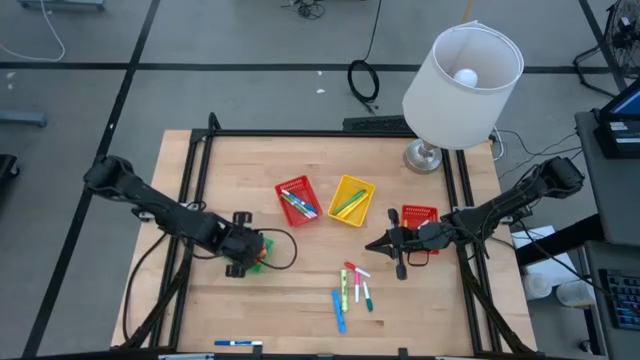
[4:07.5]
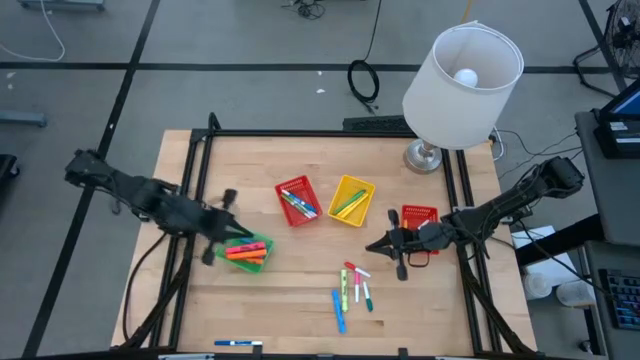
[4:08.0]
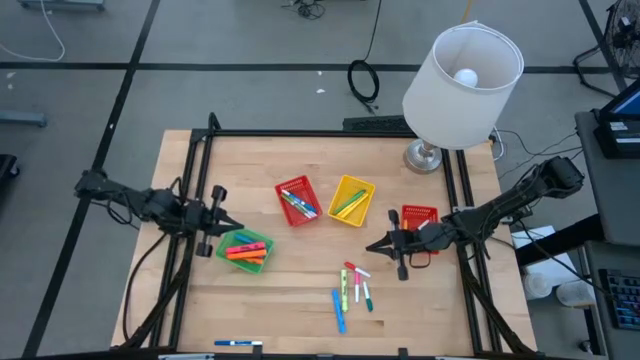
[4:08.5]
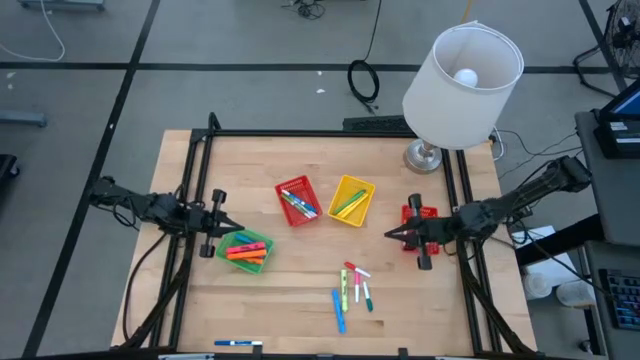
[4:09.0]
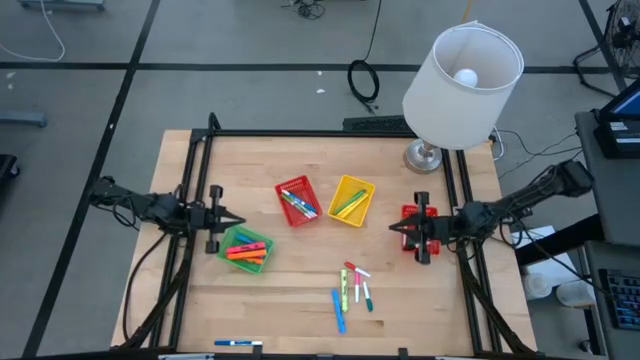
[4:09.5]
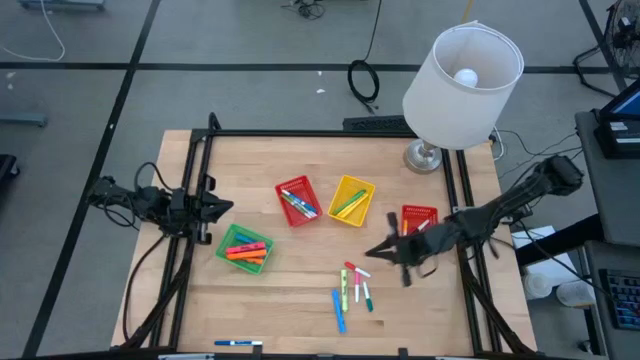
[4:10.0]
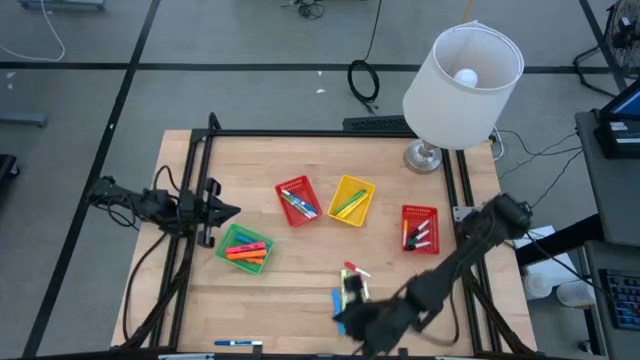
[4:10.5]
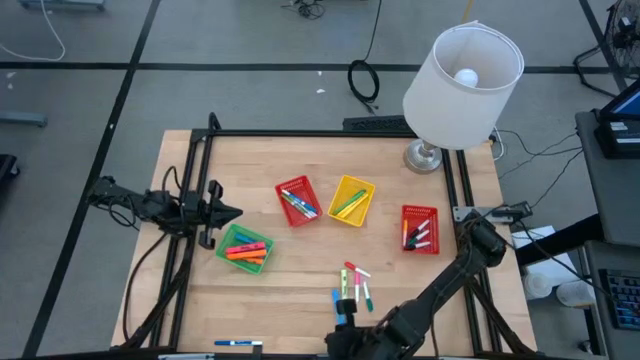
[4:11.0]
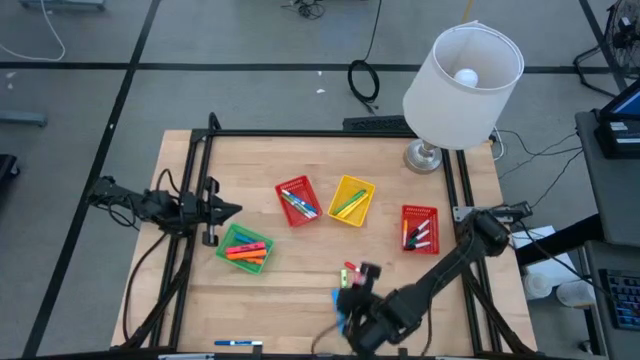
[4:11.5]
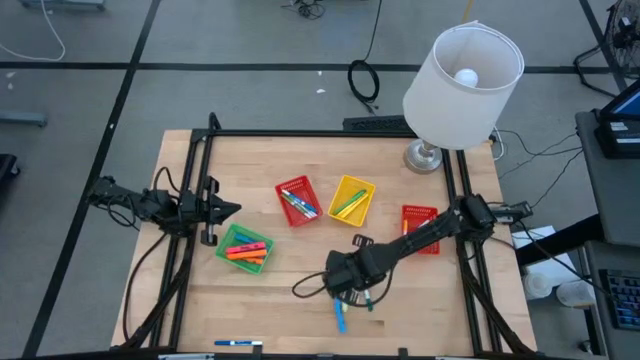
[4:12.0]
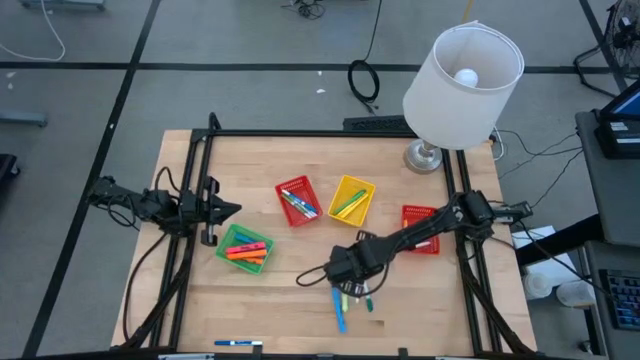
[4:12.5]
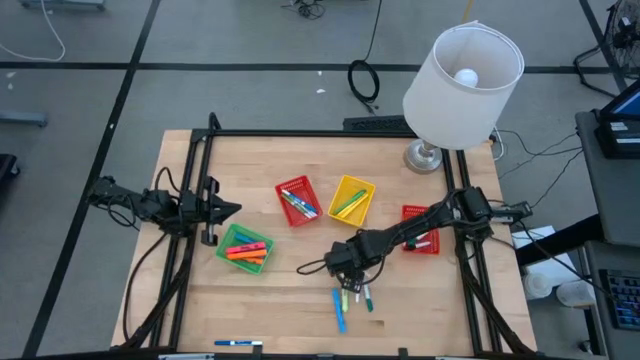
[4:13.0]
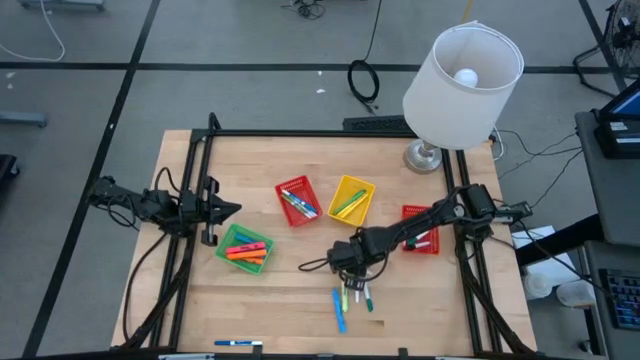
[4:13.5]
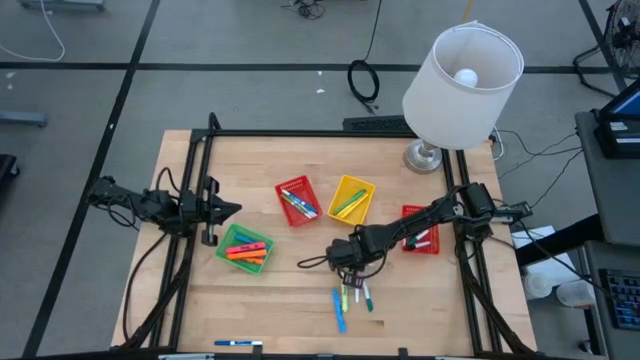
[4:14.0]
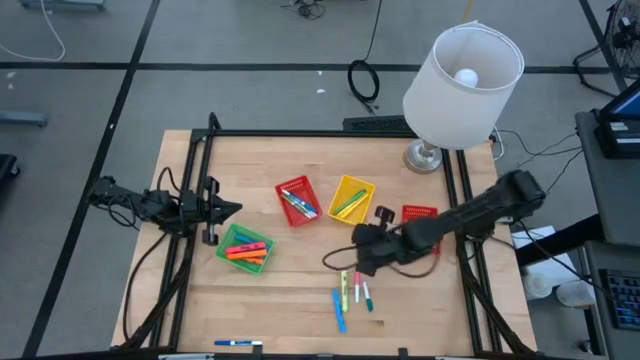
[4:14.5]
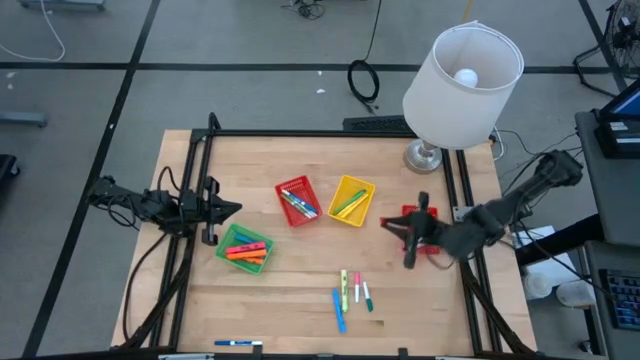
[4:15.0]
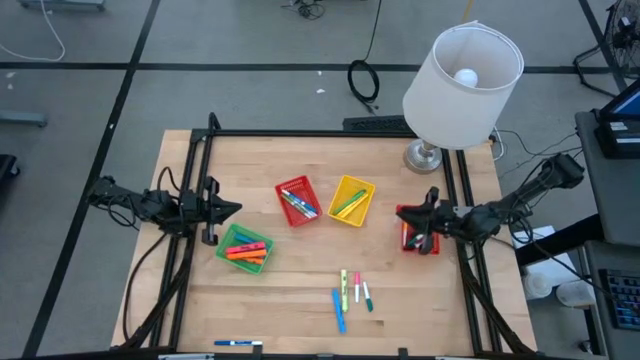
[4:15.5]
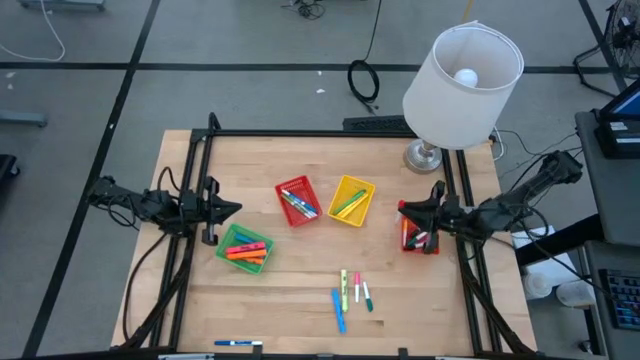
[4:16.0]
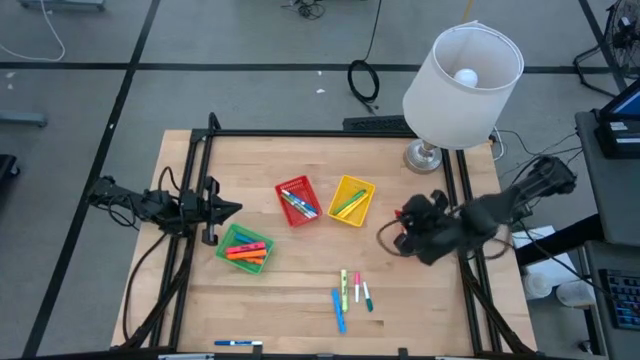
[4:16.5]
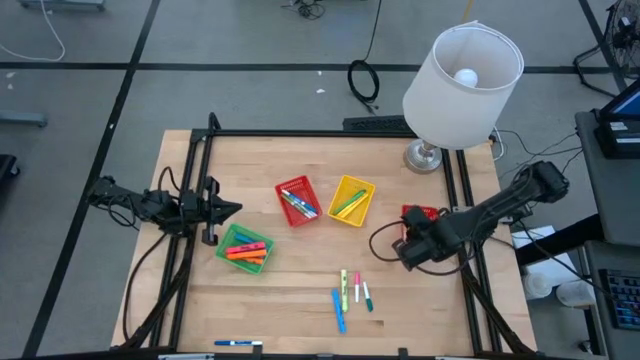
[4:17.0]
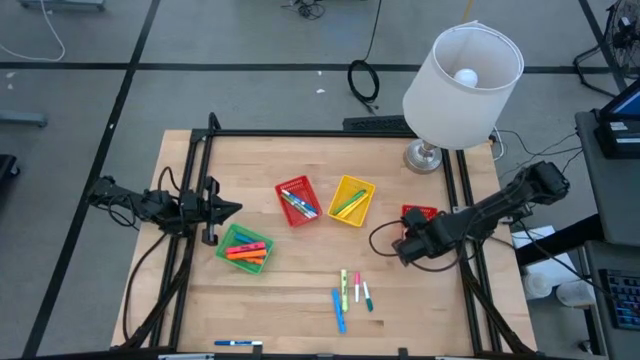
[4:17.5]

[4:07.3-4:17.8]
Task: Pick & Place Markers
Put the white and red marker into the right red bin

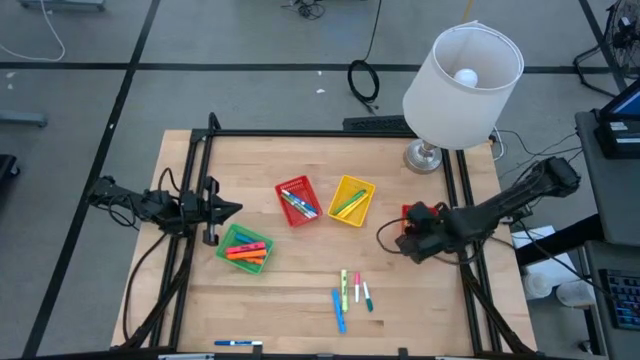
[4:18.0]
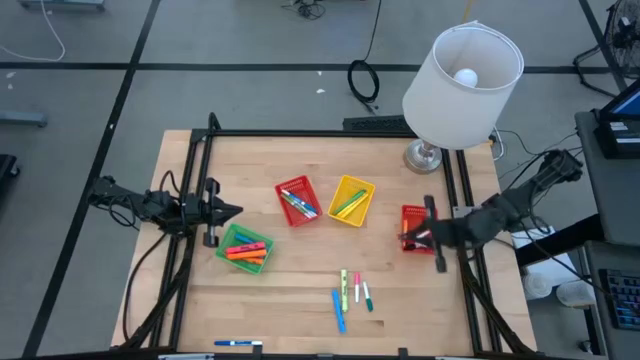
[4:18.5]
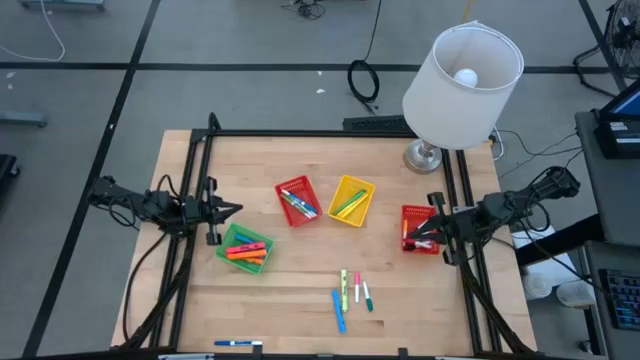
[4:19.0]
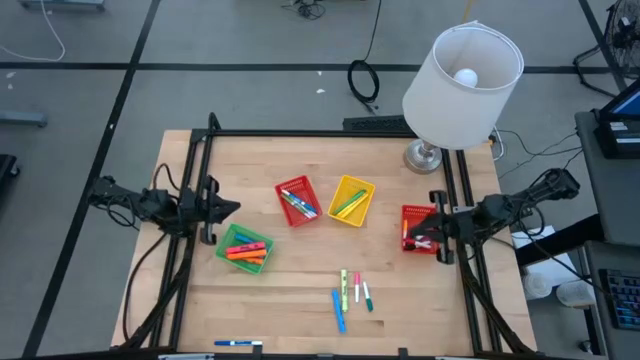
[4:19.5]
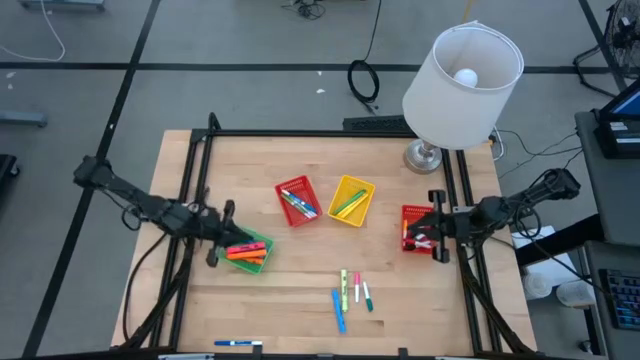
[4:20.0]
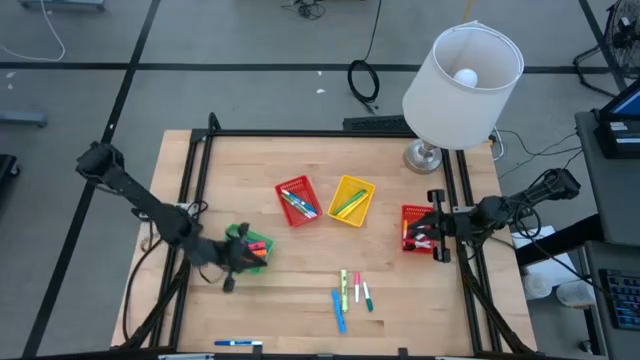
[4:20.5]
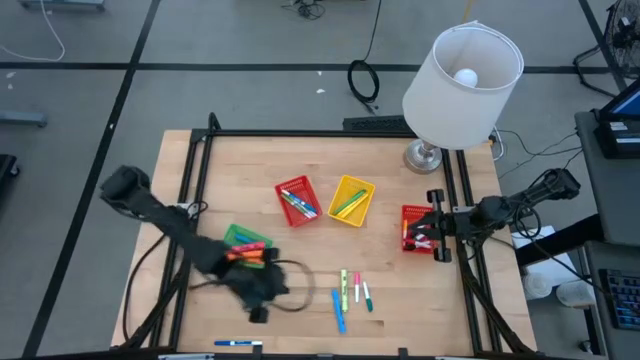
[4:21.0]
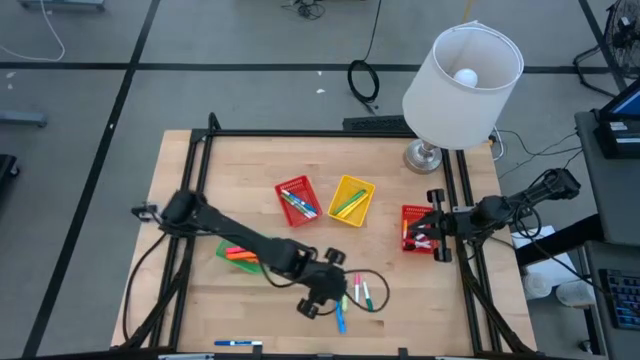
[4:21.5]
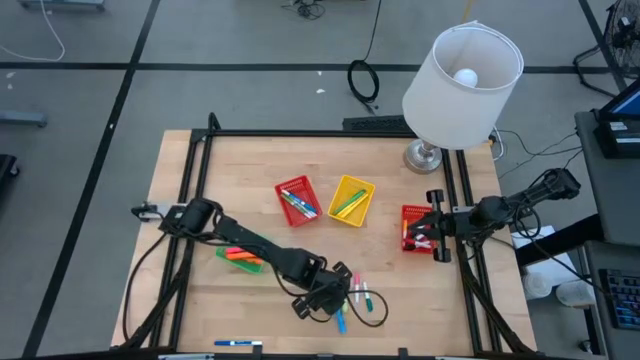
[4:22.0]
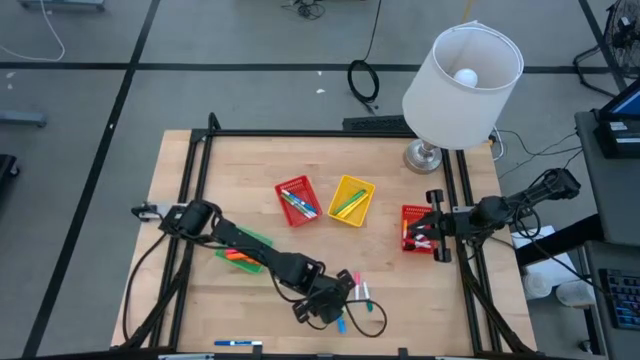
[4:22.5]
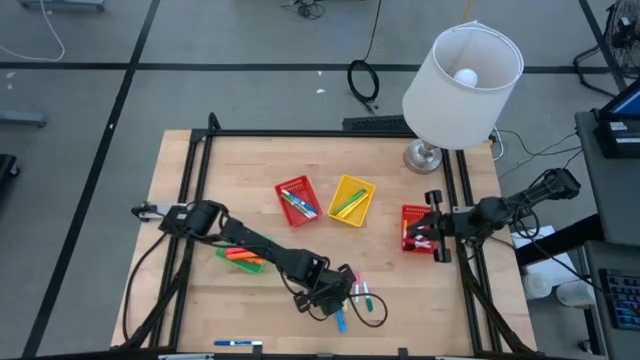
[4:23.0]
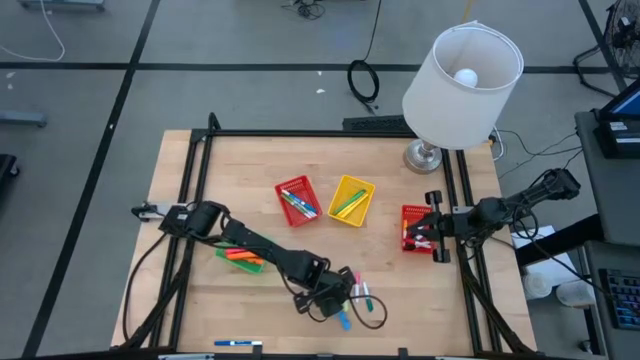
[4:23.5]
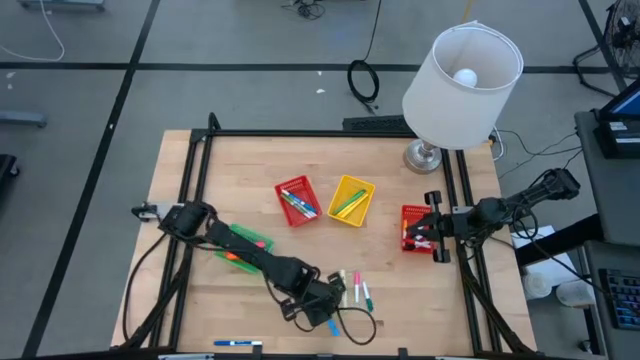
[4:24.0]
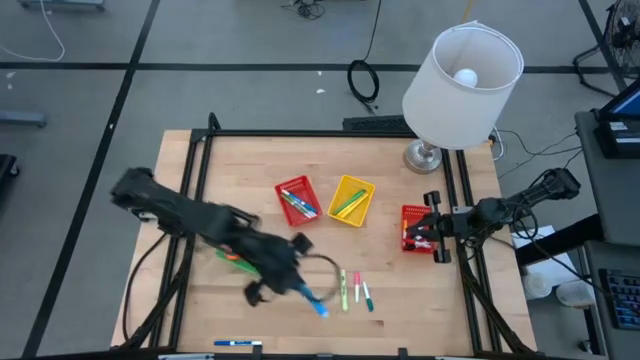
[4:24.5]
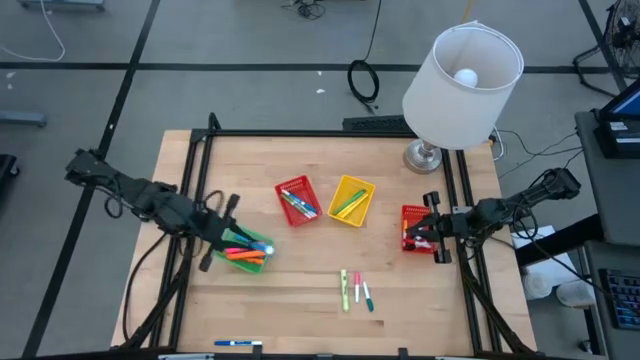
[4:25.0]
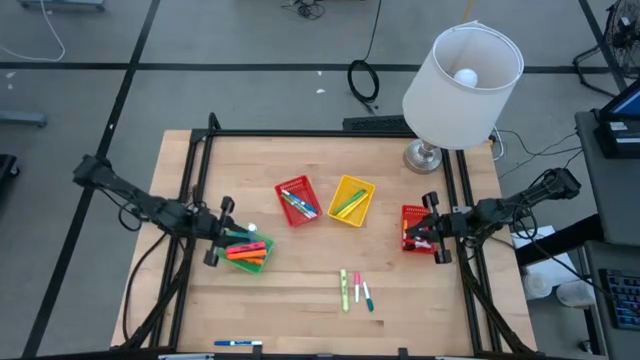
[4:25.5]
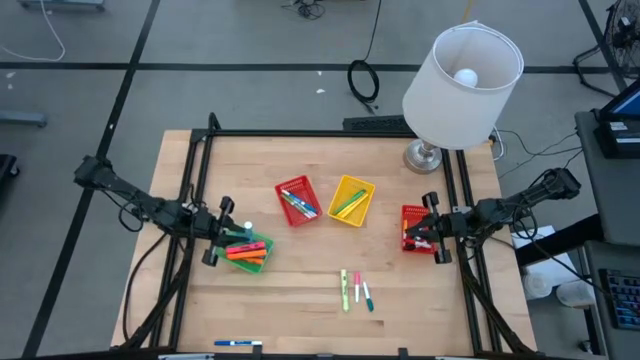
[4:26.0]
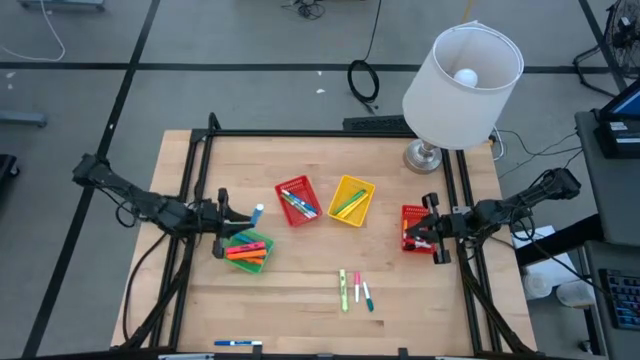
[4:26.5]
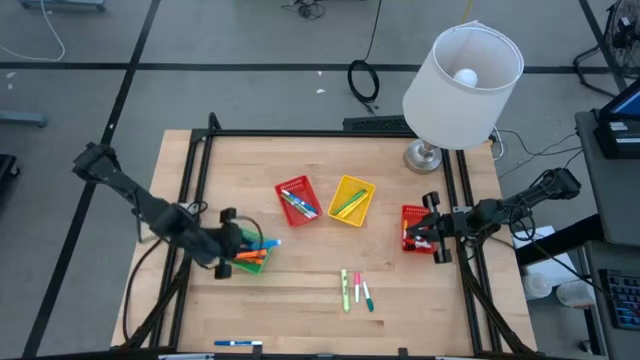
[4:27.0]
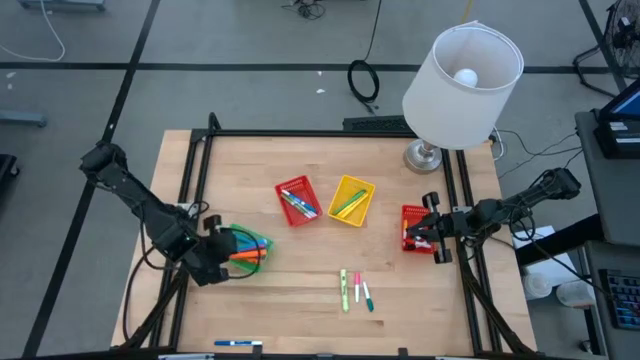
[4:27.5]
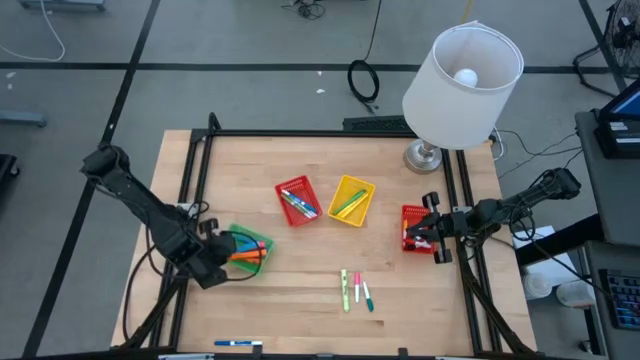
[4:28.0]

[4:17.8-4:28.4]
Put the blue highlighter into the green bin

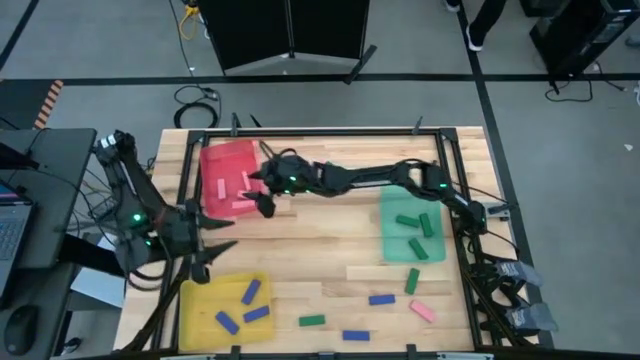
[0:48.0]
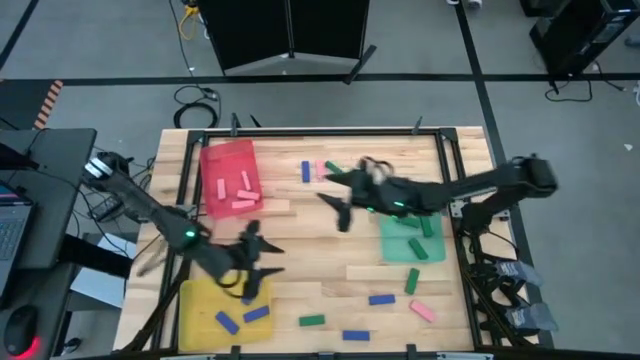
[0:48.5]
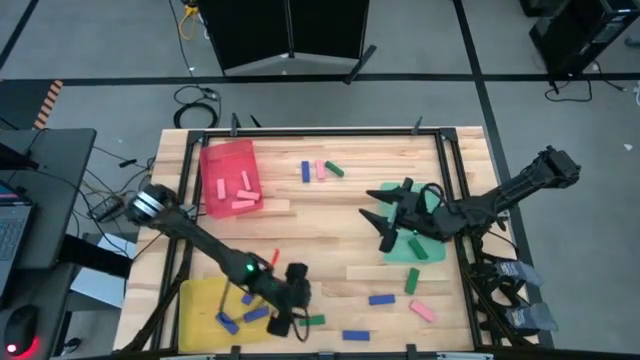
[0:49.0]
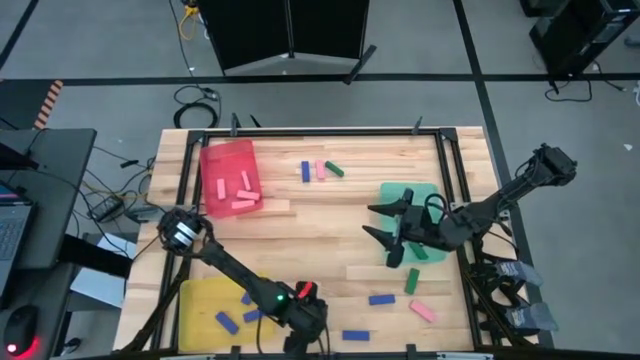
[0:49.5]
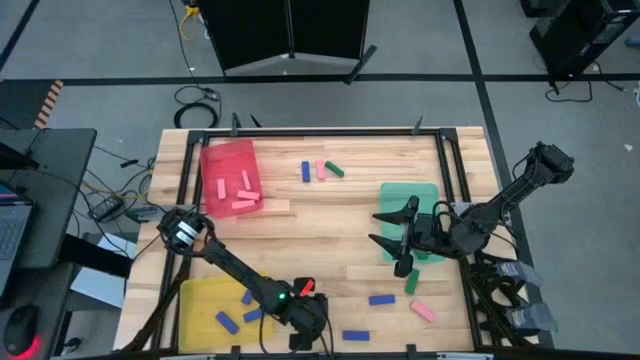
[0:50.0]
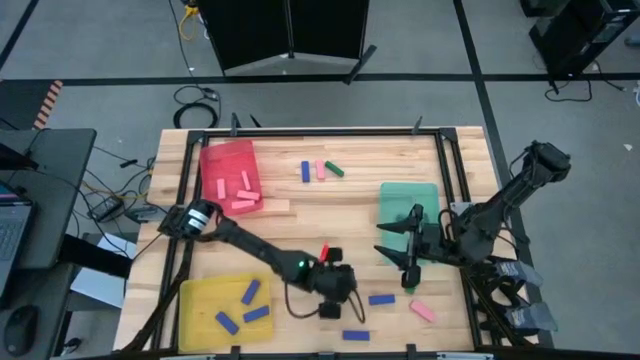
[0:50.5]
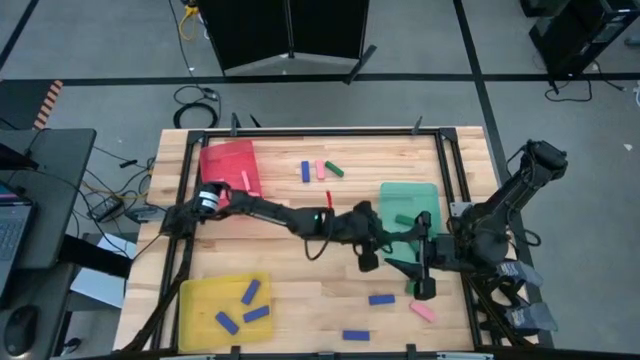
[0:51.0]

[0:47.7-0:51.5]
Task: Sort blocks
Put the green block into the blue bin
